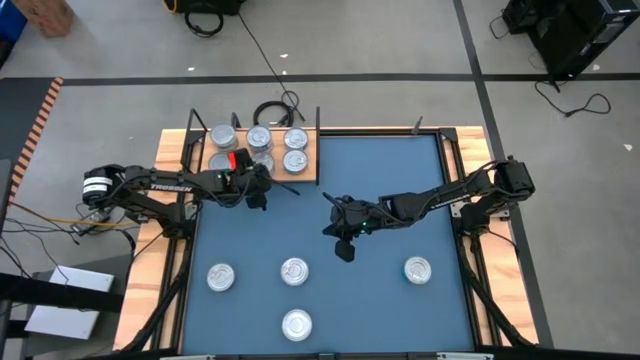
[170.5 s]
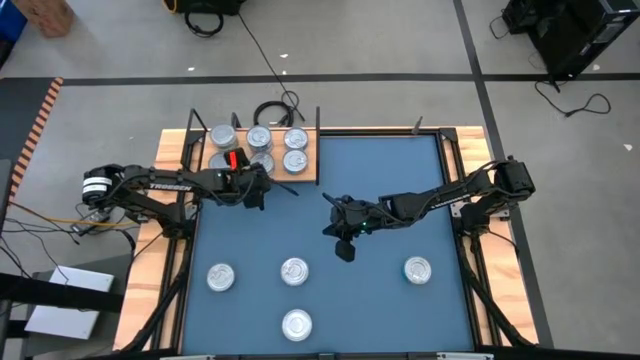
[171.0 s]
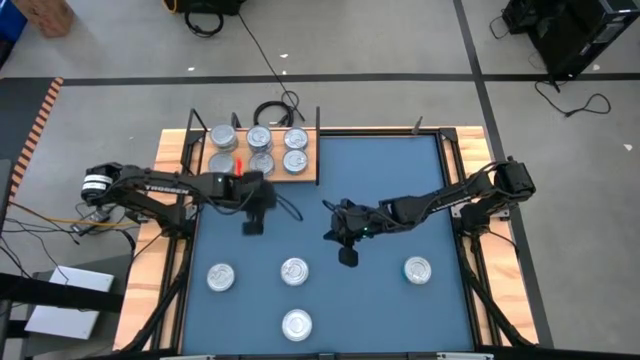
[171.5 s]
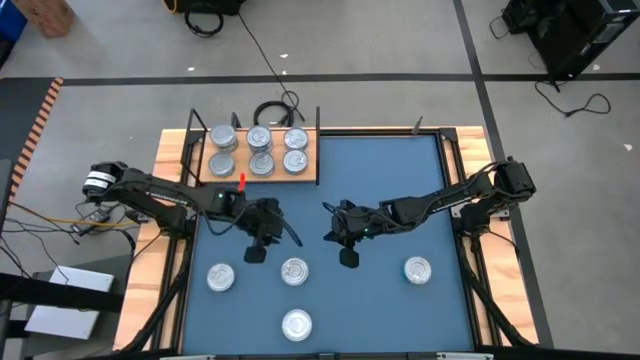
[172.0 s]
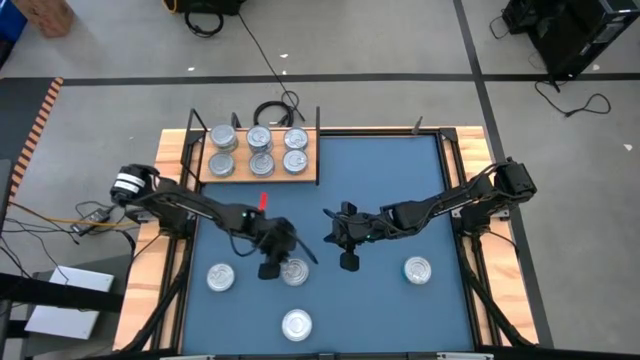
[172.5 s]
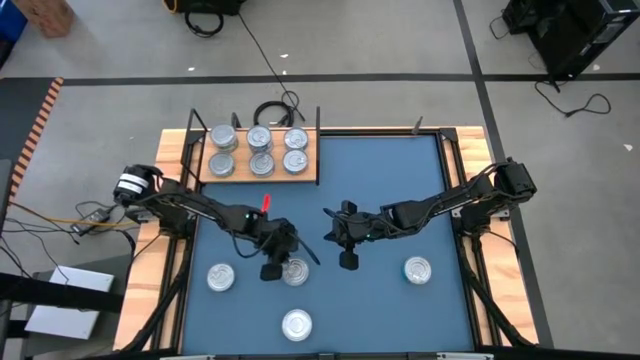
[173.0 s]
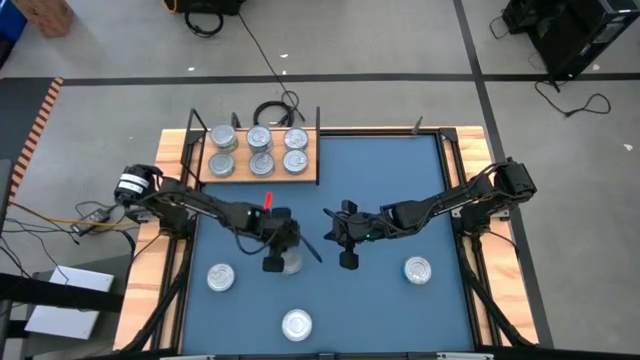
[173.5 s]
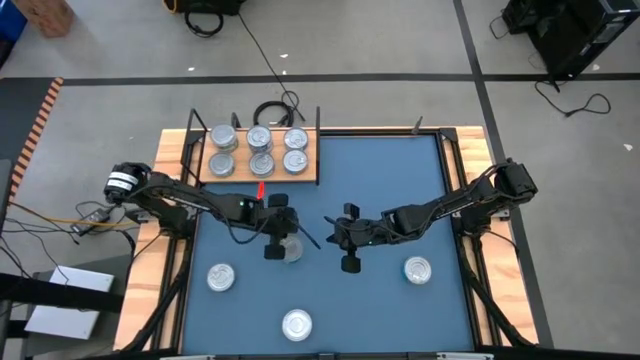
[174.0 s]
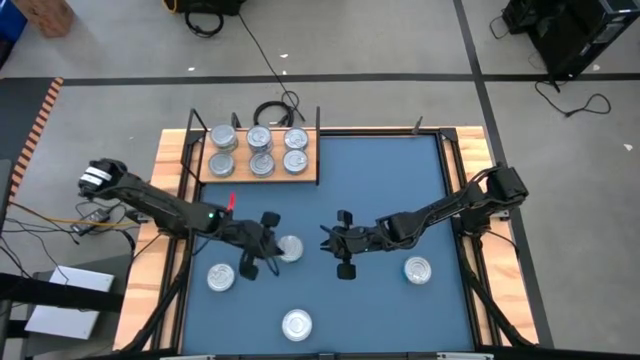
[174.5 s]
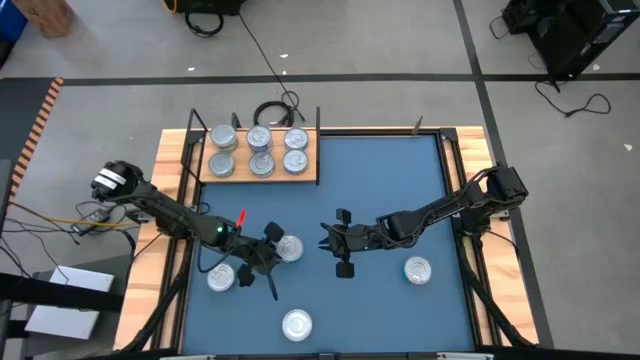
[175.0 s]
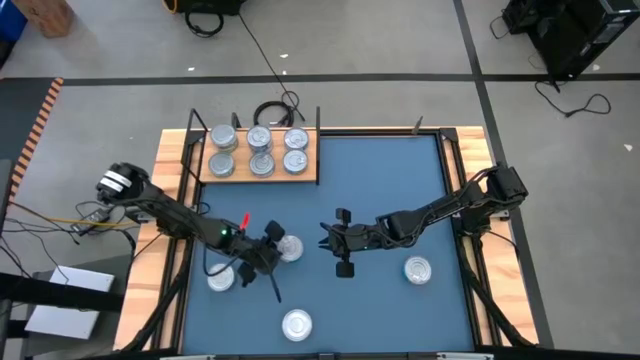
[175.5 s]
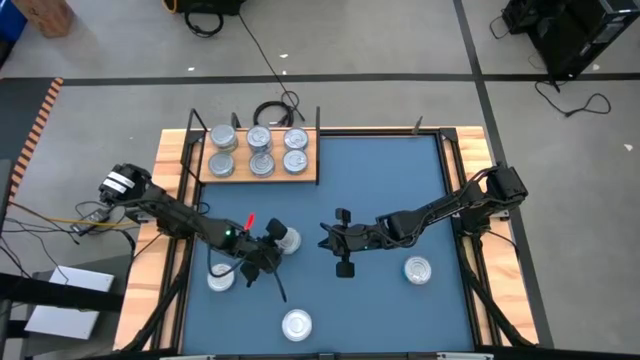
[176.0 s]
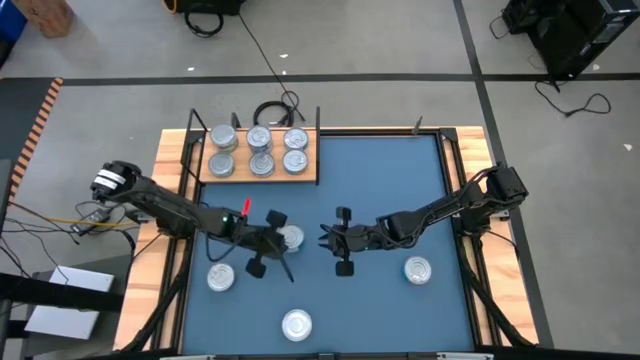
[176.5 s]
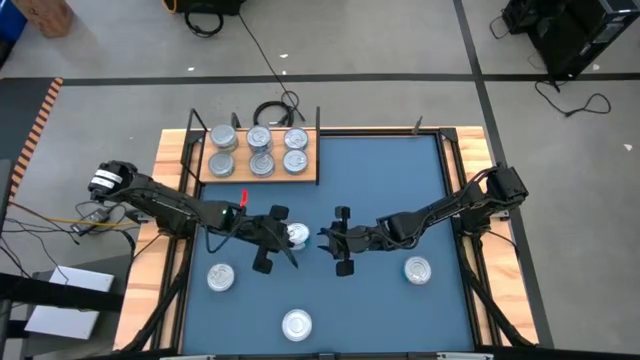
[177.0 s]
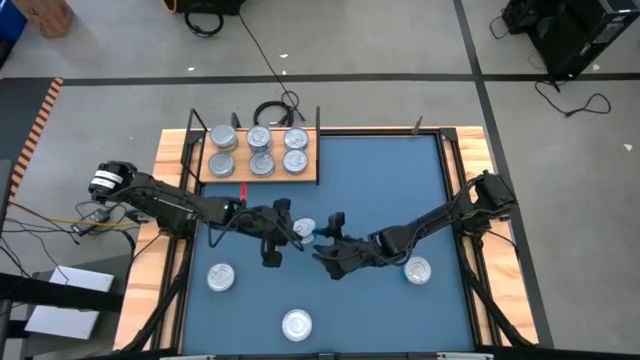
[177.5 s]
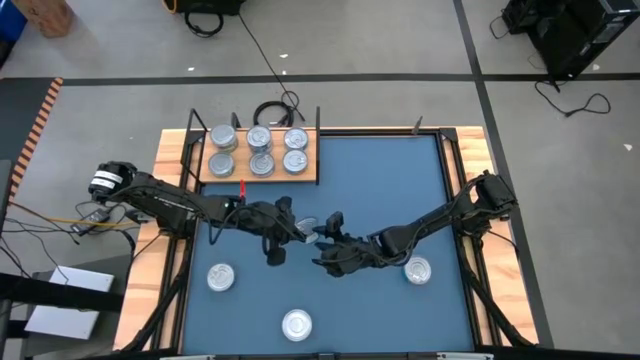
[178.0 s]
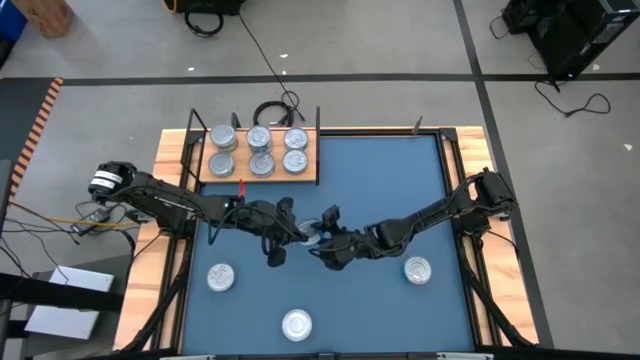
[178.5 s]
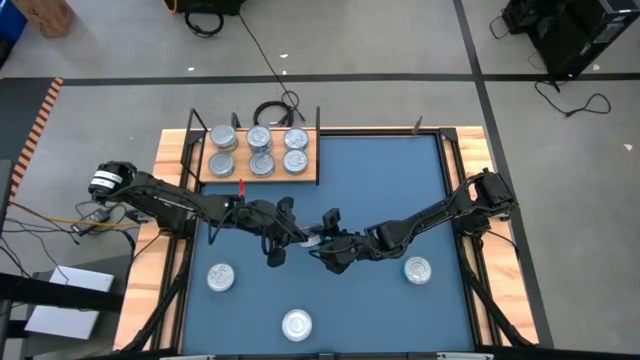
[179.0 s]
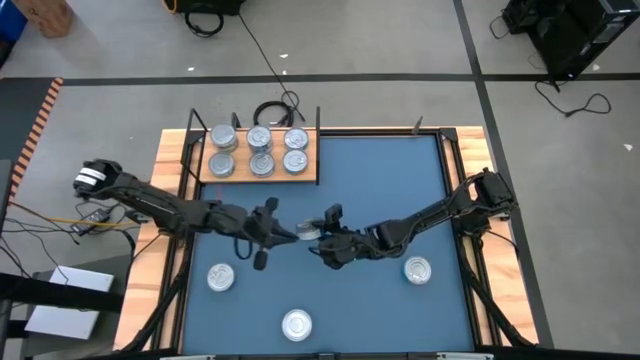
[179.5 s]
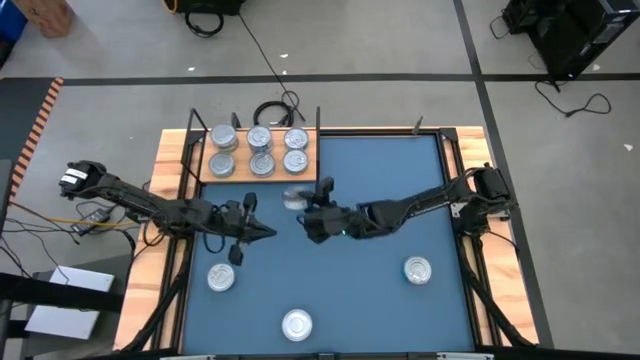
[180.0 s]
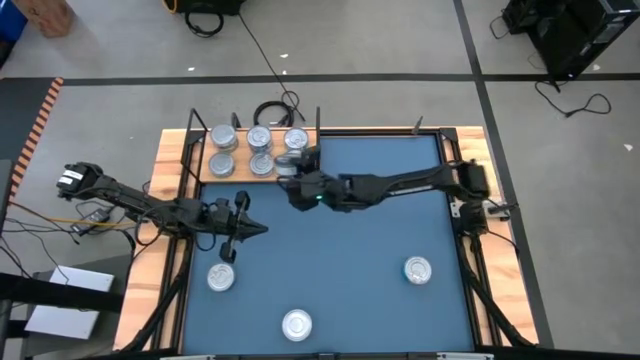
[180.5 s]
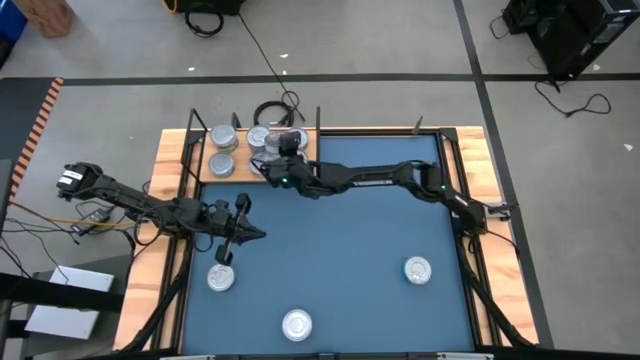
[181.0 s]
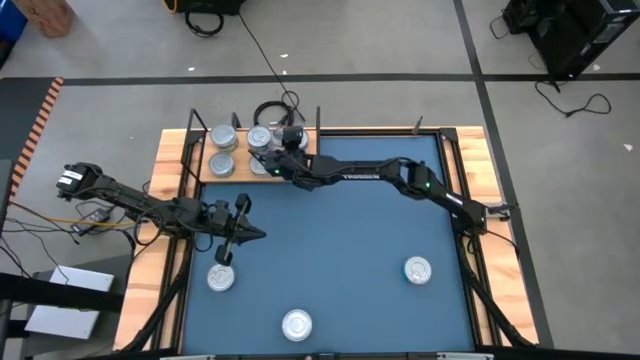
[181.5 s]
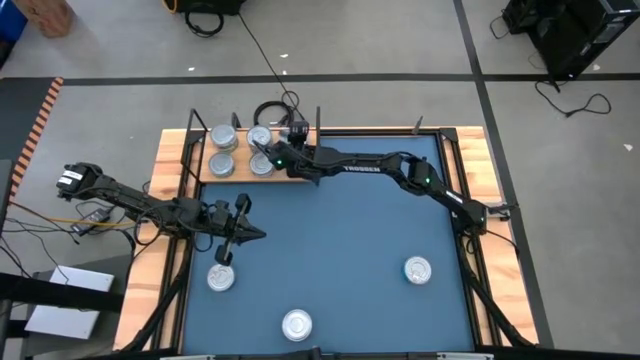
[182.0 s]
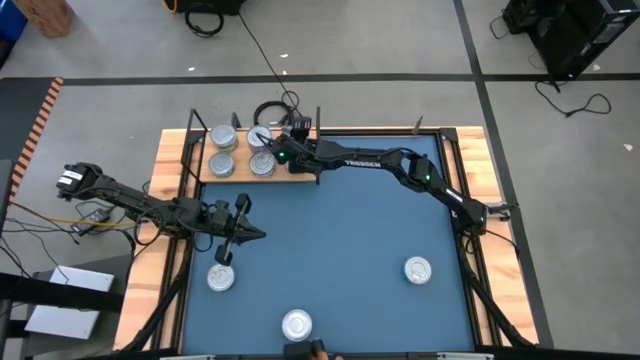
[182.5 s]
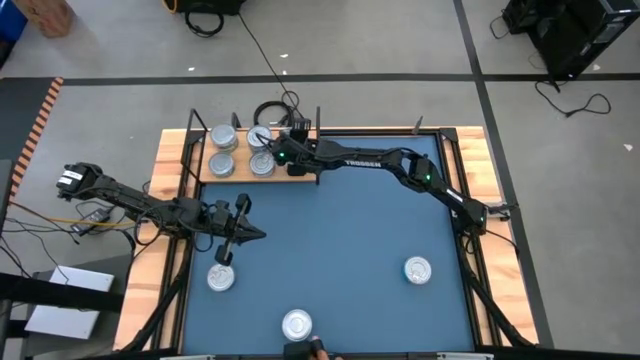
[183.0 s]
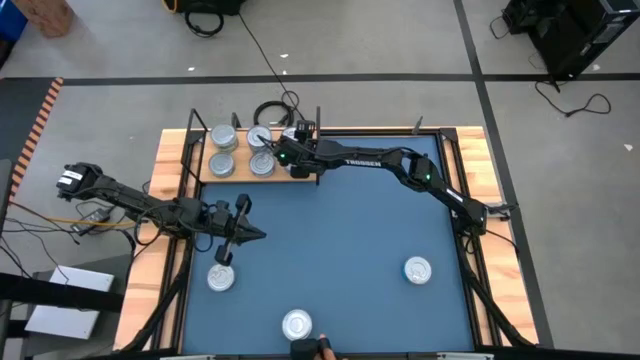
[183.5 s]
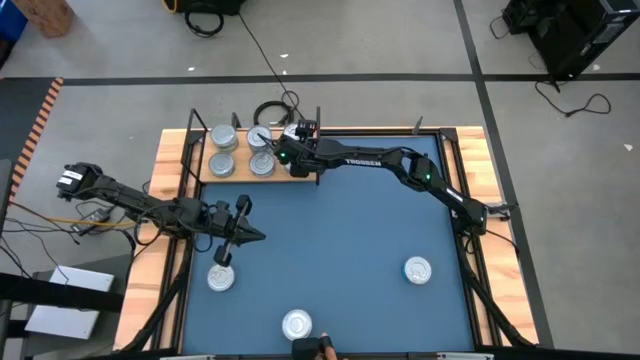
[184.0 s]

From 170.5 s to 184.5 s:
Task: Stack canned seafood by type on shelf
Stack the yellow blue tuna can on top of the yellow blue tuna can on the shelf
